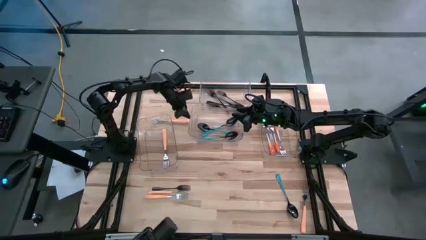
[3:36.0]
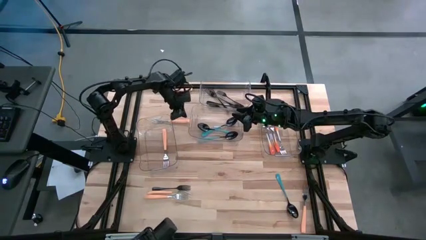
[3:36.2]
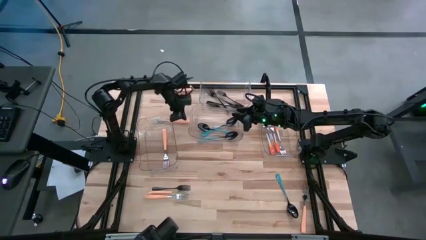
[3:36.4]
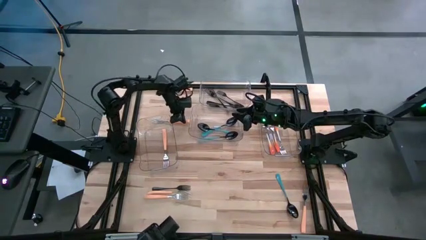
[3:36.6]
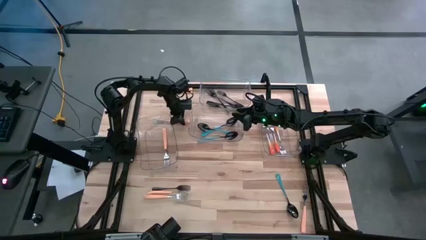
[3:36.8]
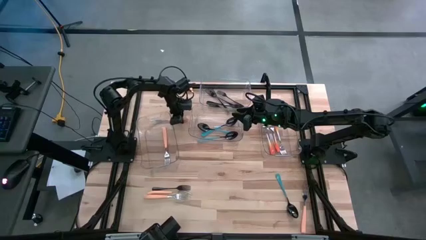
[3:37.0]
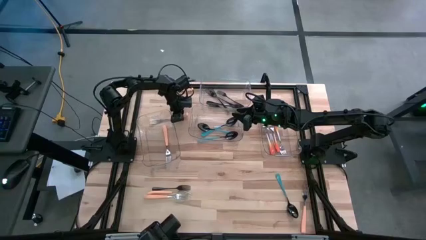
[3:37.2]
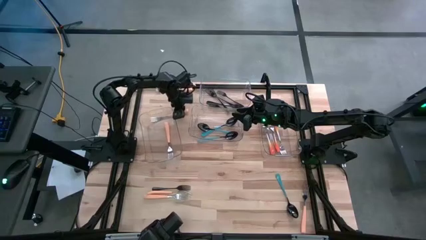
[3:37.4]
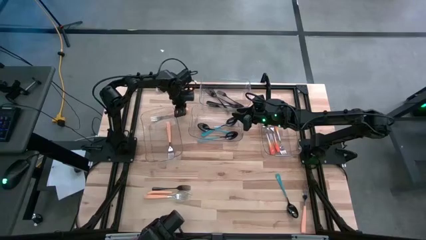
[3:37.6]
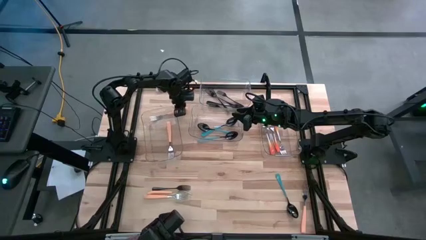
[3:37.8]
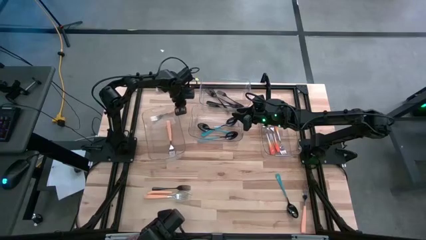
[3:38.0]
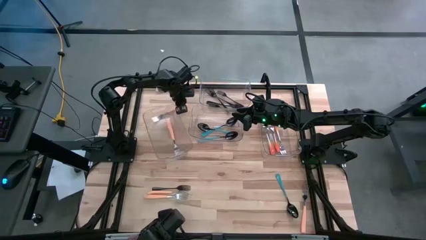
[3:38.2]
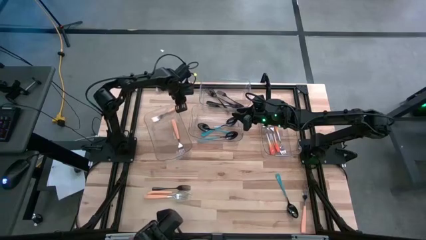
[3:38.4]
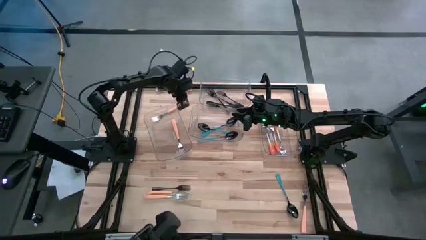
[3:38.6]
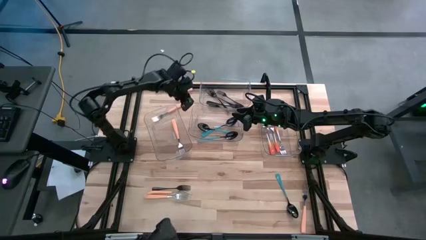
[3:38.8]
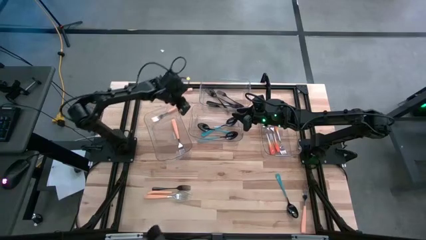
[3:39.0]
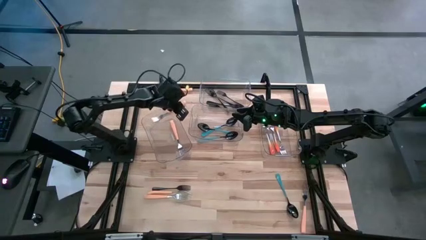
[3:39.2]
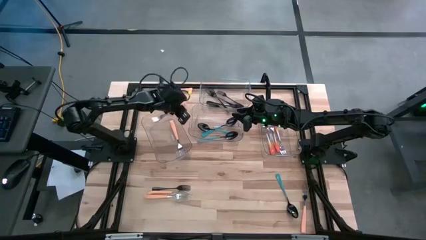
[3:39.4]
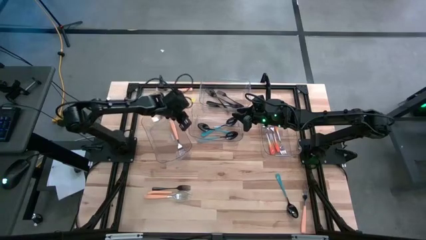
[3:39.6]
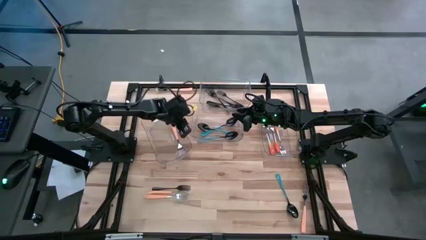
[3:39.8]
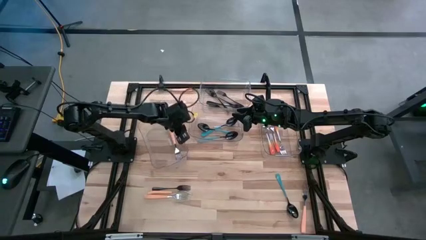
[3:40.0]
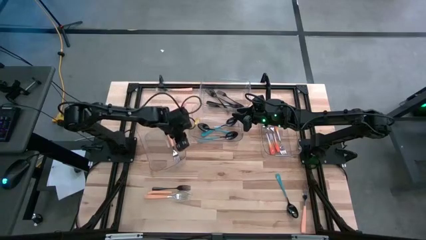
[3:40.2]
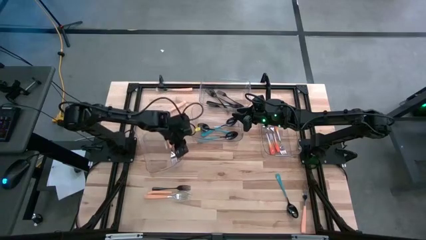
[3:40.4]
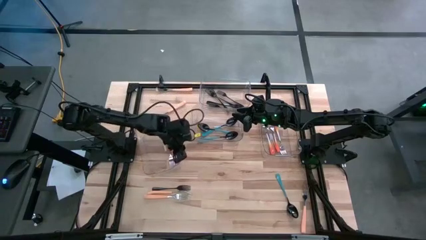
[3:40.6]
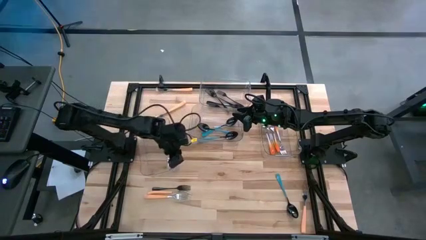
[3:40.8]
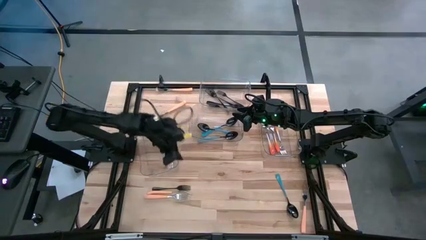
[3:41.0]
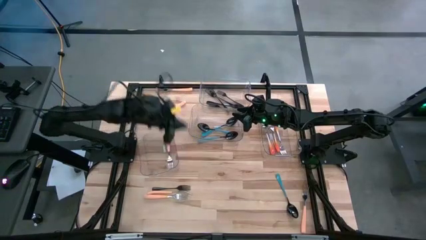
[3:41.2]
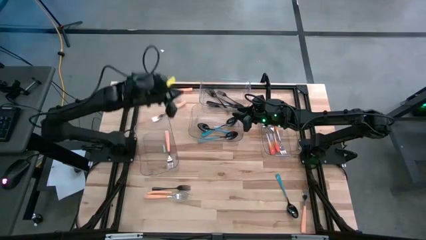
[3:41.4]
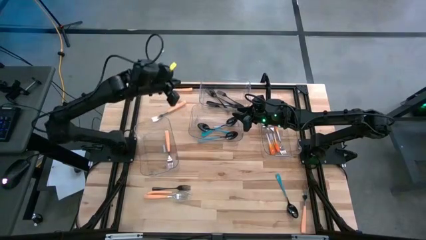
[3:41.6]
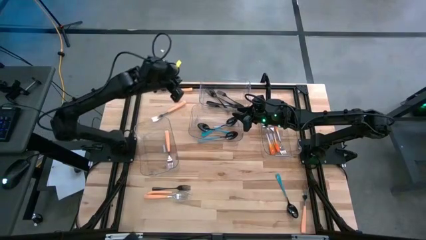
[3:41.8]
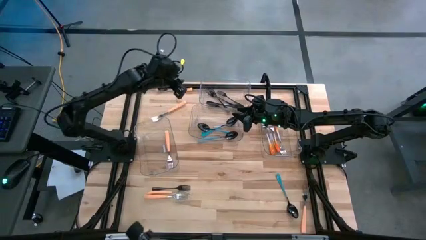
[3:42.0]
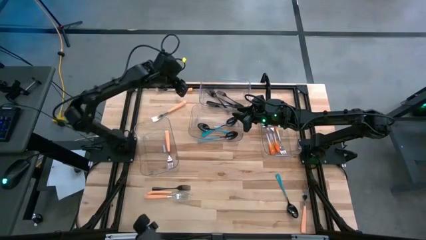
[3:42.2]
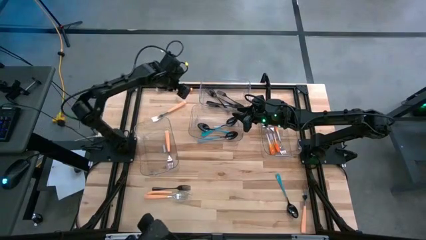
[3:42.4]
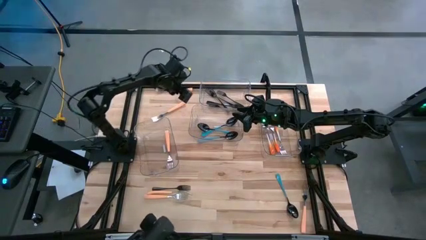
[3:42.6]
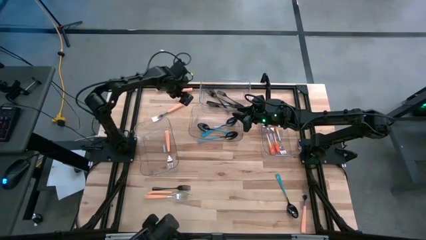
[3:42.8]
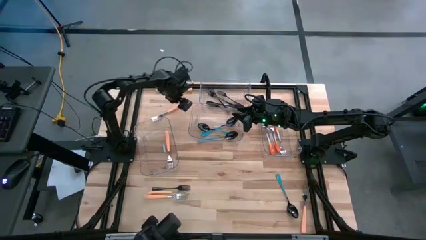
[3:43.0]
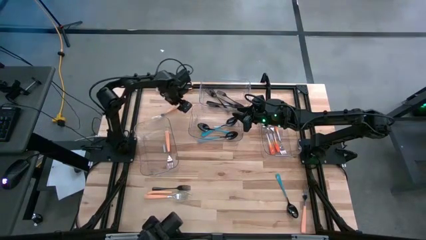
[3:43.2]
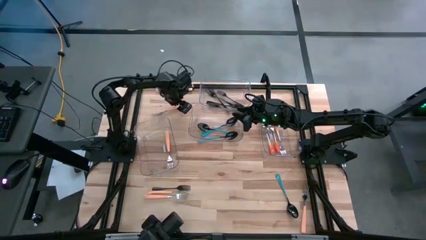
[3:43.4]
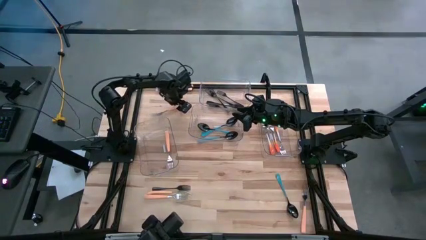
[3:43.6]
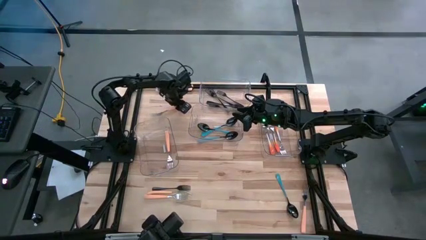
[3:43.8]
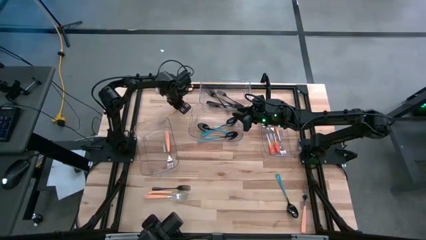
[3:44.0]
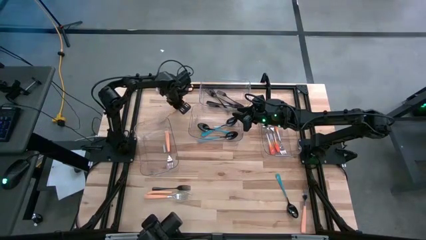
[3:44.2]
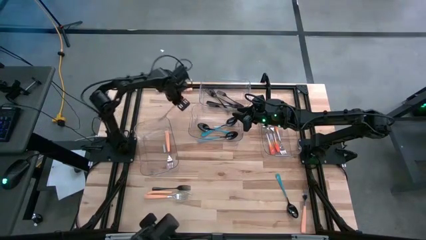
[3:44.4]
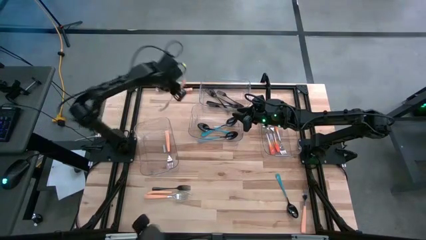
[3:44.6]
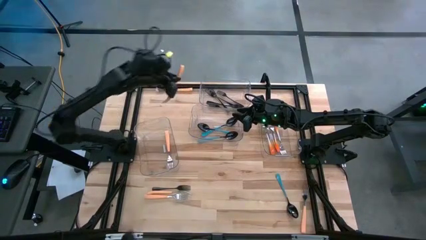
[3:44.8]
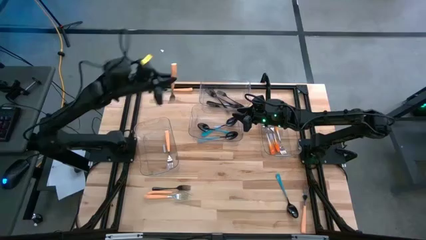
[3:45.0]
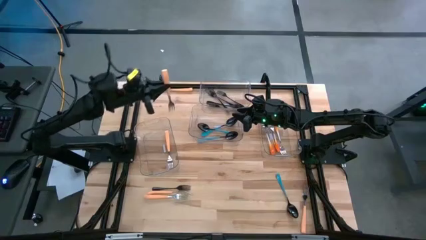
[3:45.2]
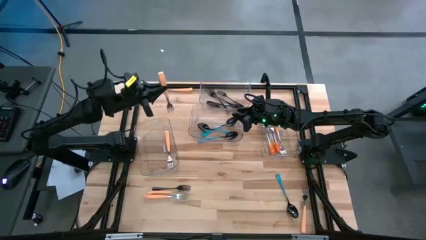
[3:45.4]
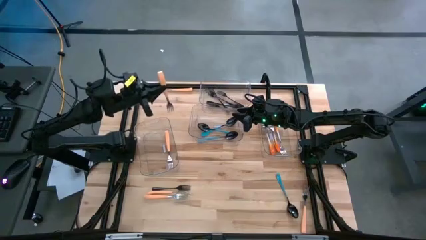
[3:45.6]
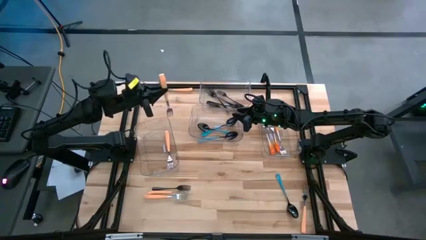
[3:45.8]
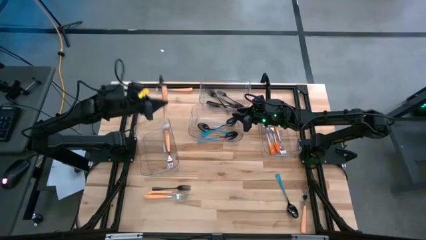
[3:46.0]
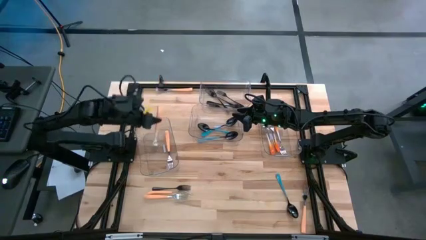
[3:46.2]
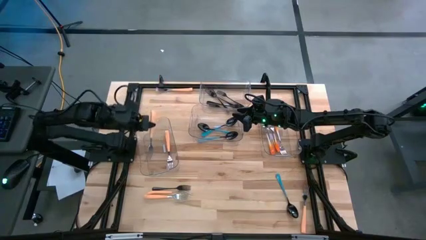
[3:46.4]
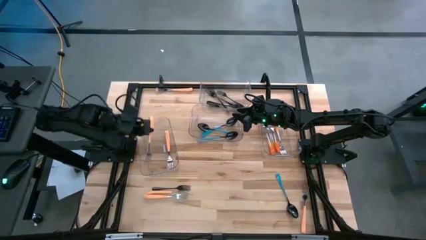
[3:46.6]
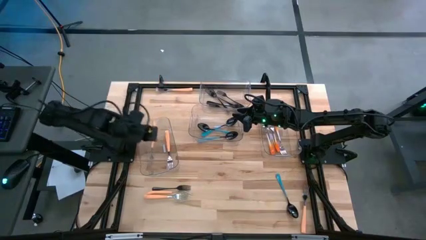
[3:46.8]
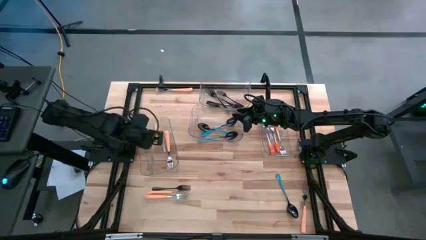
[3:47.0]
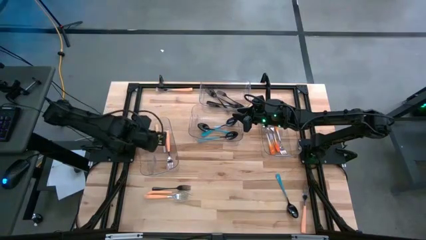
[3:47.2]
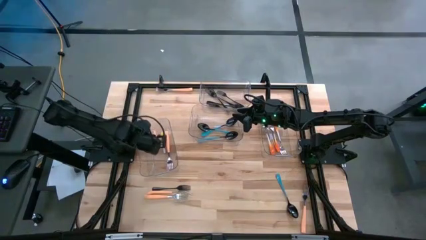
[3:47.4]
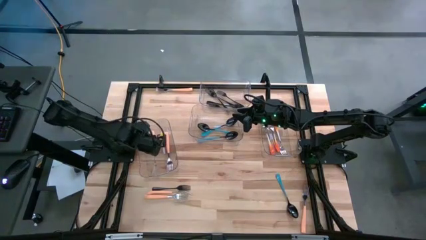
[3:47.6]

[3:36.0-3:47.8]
Task: Sort silverware by color (type)
Put the light orange fork into the bottom left transparent bin
